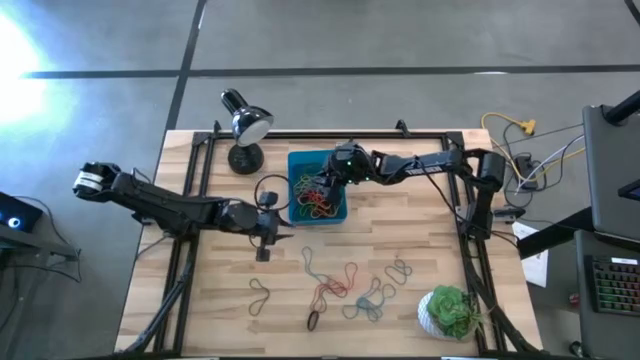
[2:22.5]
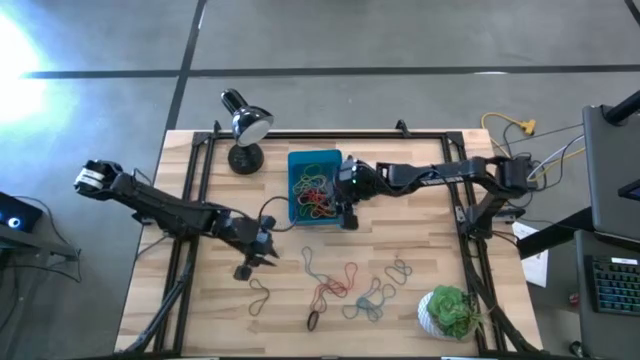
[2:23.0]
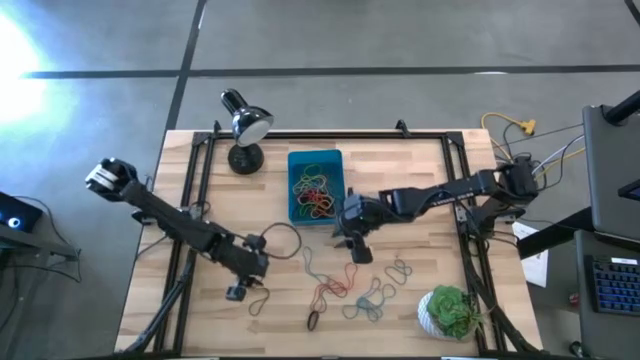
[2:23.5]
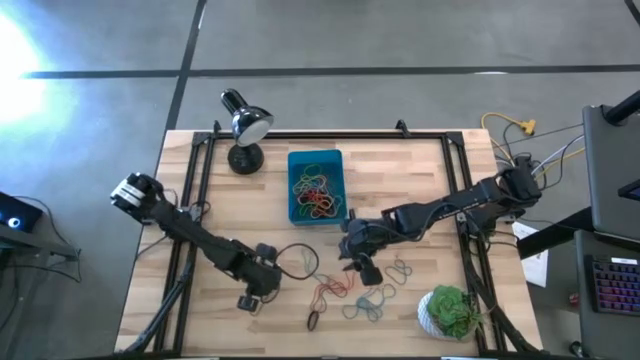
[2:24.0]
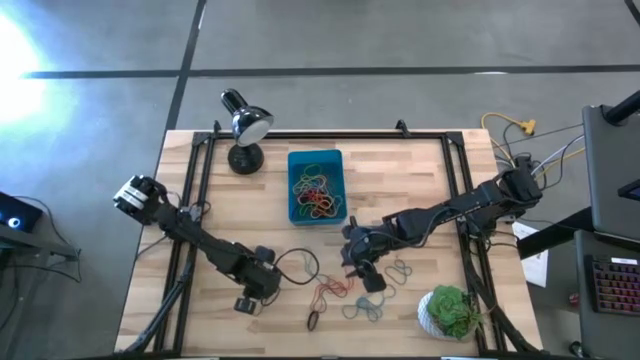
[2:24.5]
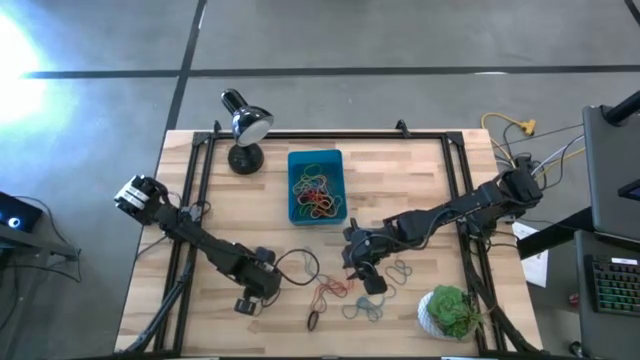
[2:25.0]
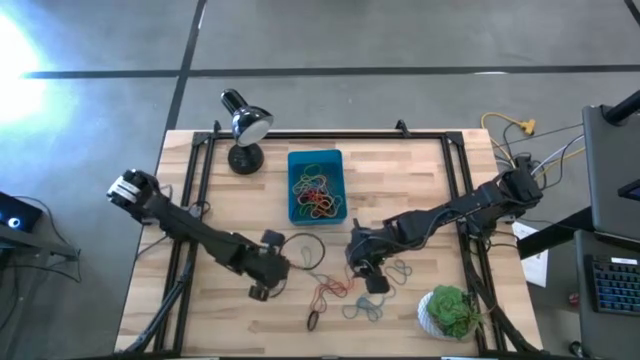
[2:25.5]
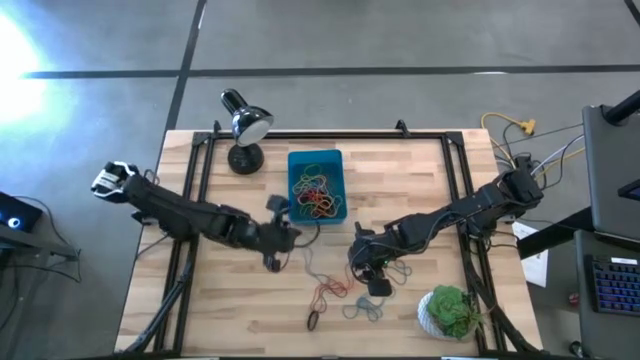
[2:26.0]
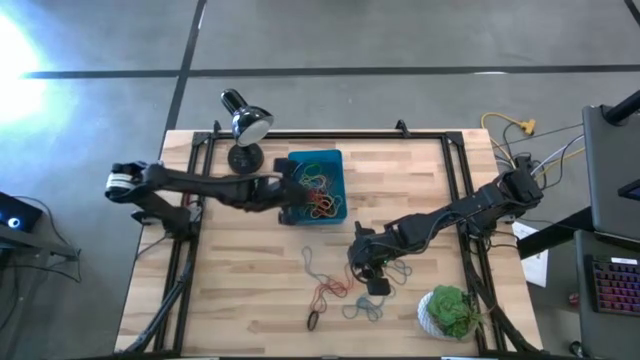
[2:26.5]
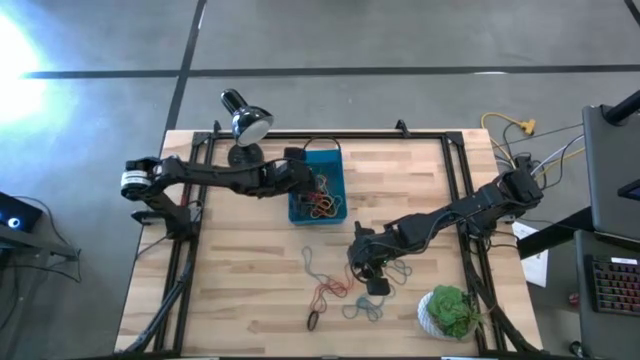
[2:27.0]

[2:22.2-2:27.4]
Task: Pick and place rubber bands into bin
Put the violet rubber band into the blue bin

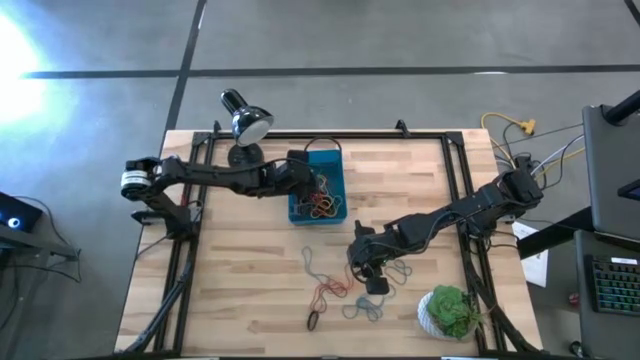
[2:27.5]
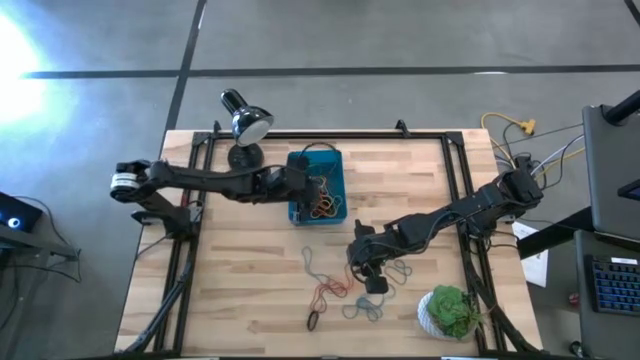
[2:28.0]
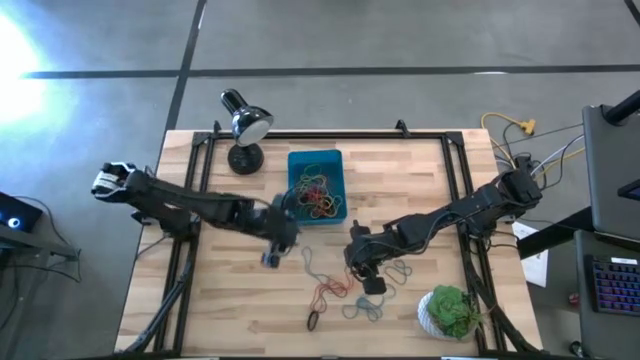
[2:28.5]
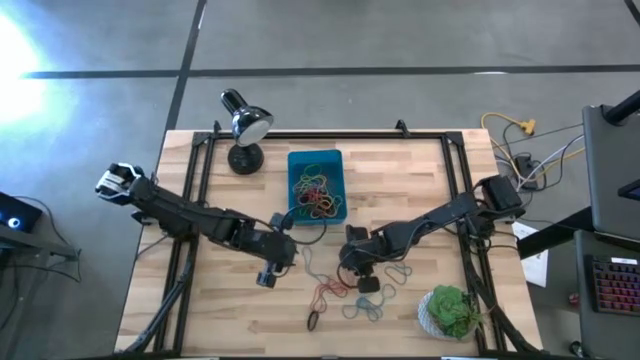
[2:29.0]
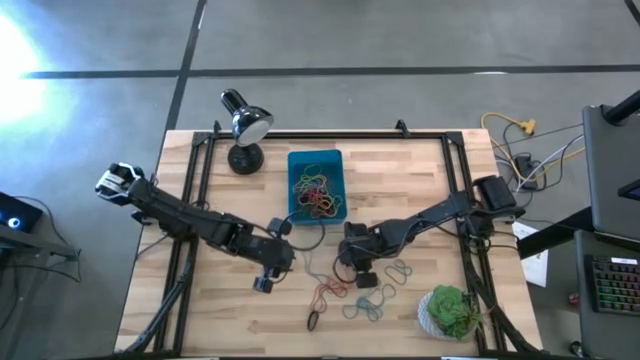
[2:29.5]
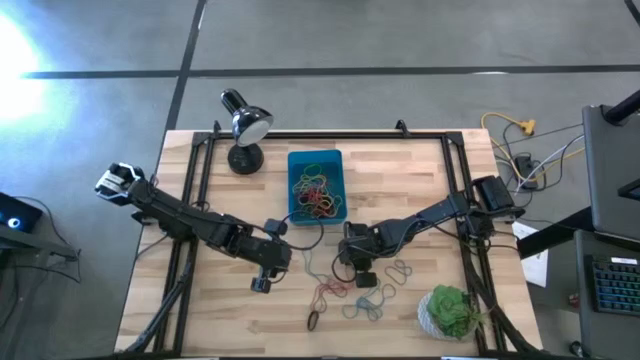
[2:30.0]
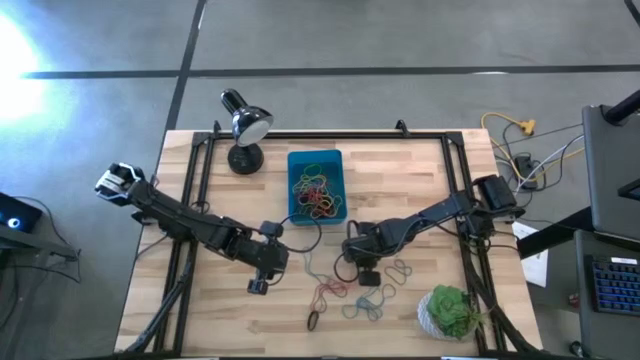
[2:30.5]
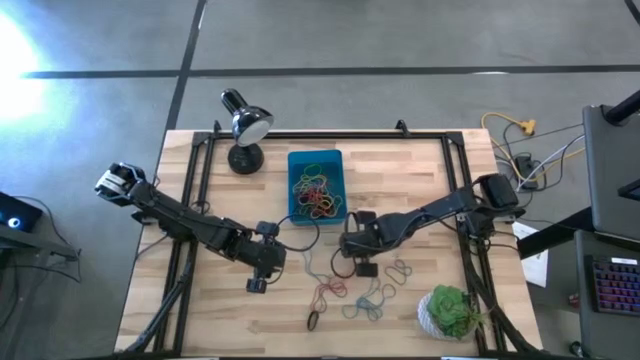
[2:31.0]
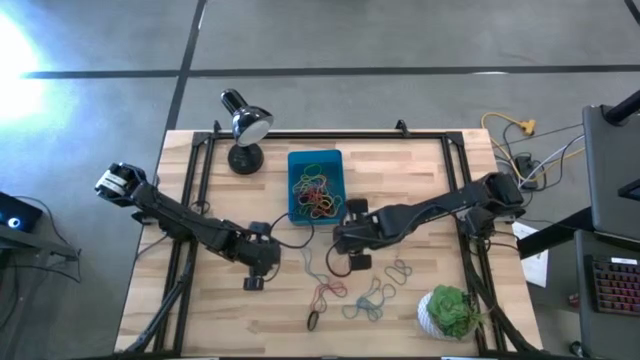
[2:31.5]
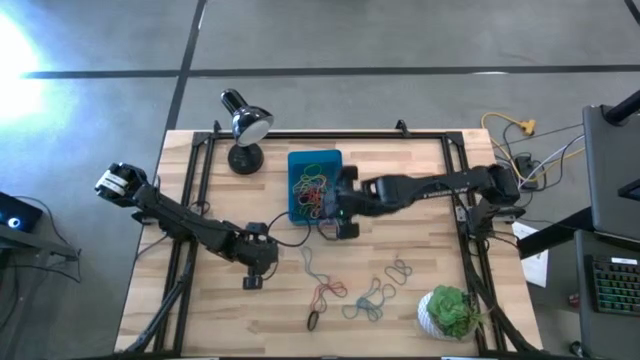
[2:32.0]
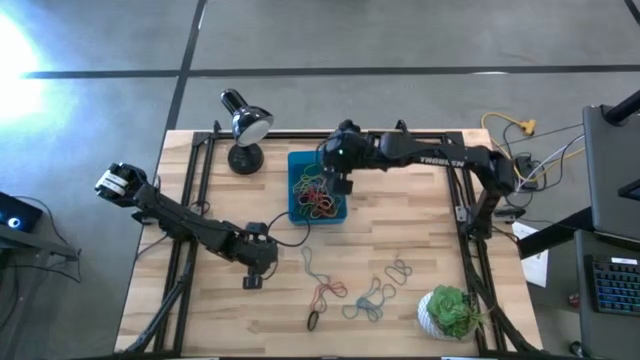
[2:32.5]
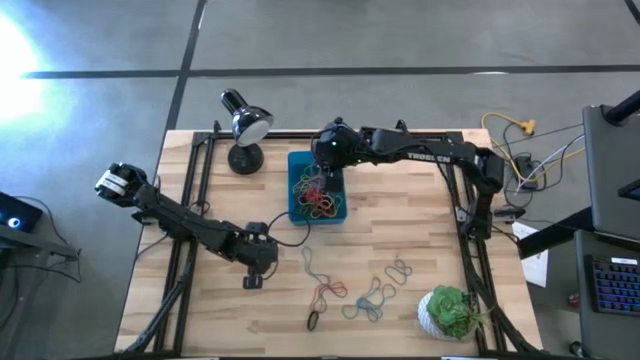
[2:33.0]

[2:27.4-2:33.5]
Put the red rubber band into the blue bin

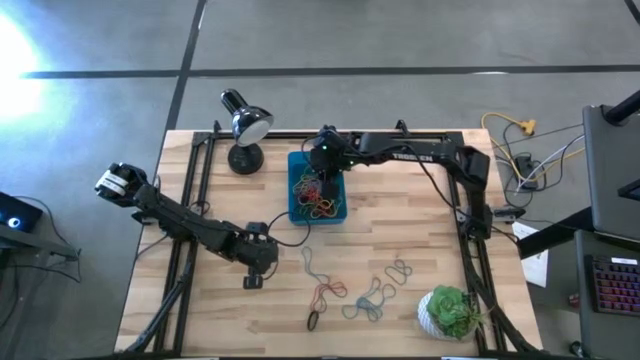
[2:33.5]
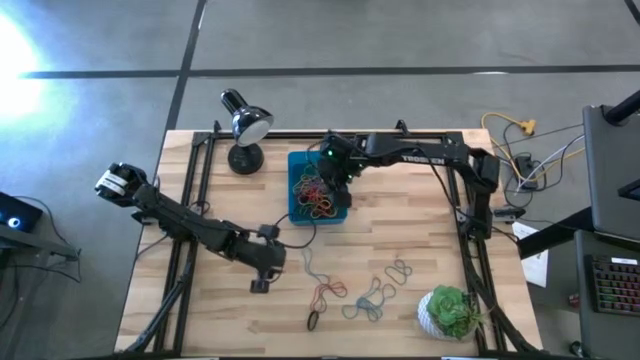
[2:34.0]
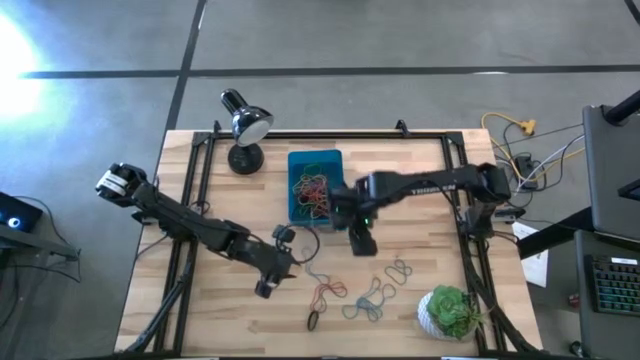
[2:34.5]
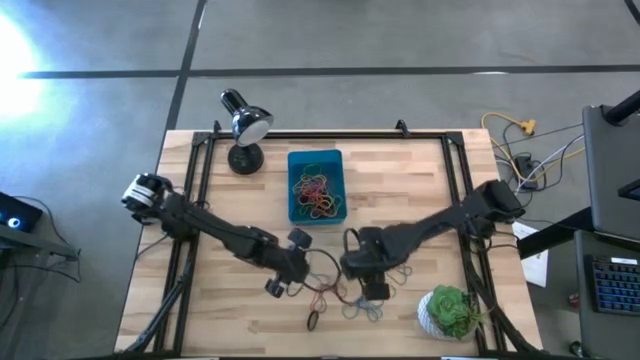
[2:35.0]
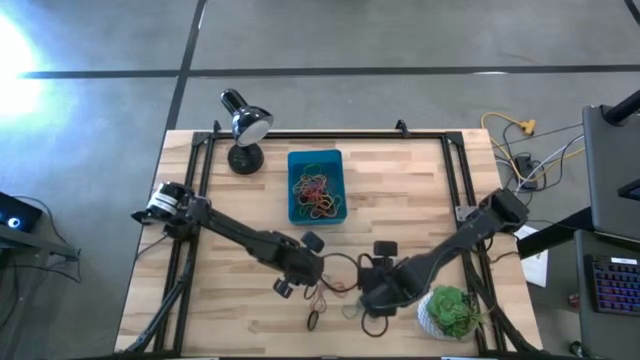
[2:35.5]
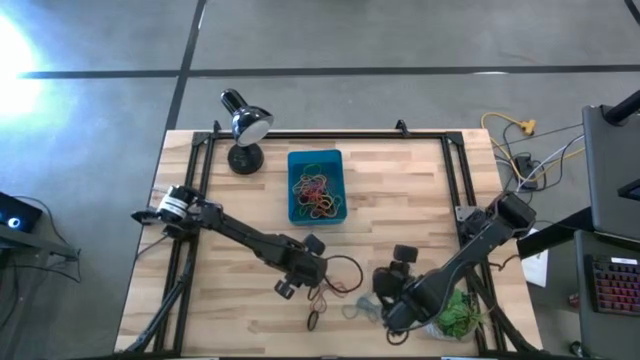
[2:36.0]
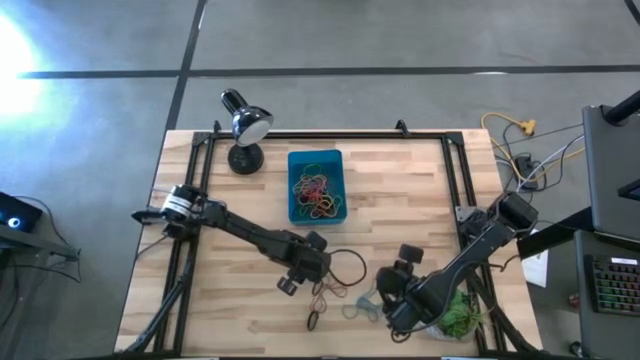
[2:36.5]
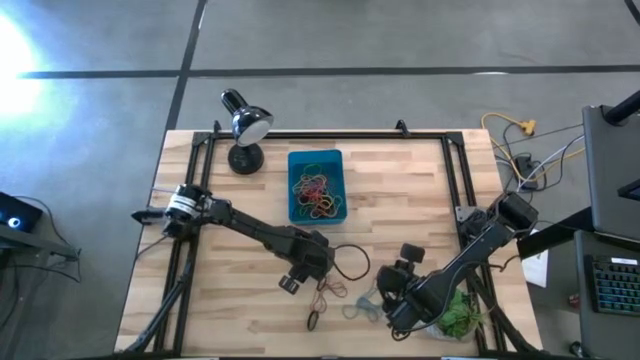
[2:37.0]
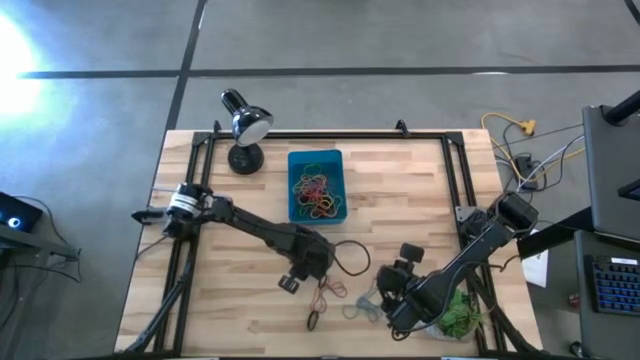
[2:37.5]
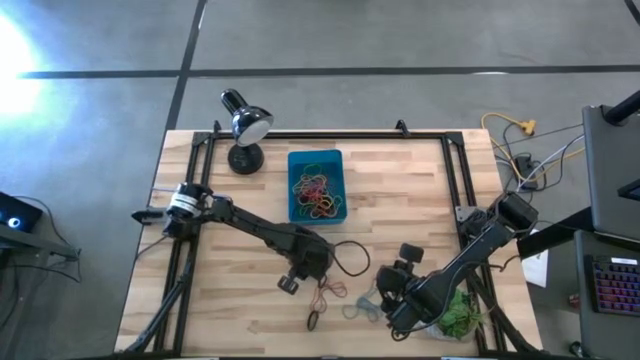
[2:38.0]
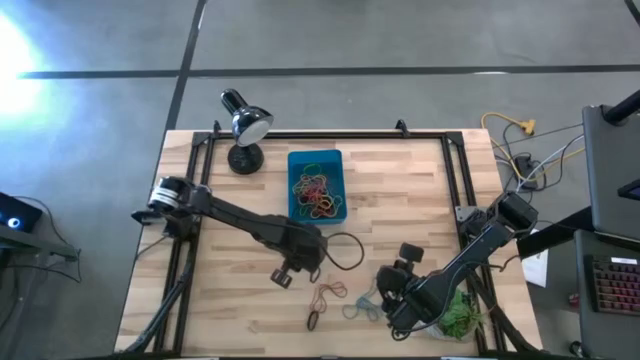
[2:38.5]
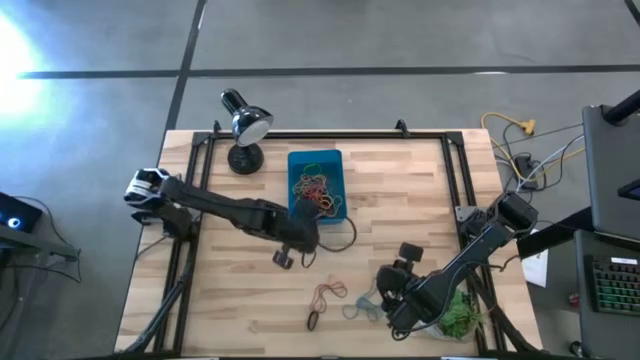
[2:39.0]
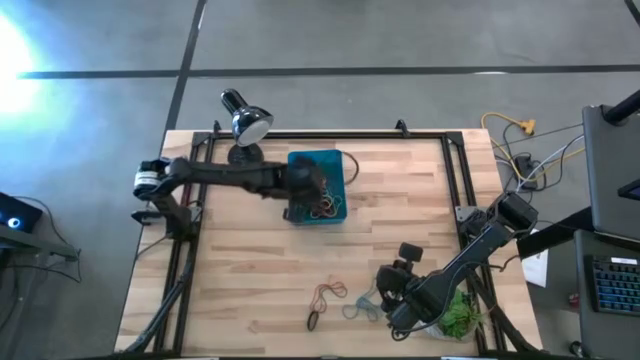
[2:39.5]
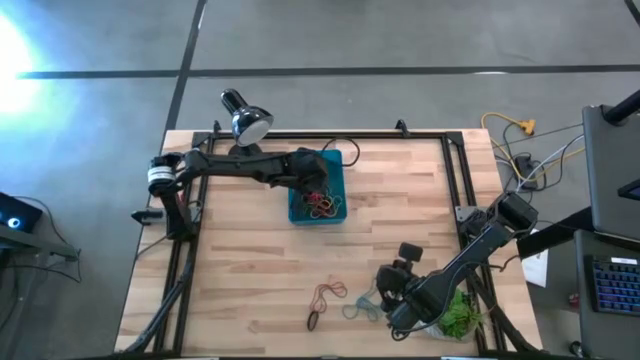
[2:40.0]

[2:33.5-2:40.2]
Put the blue rubber band into the blue bin

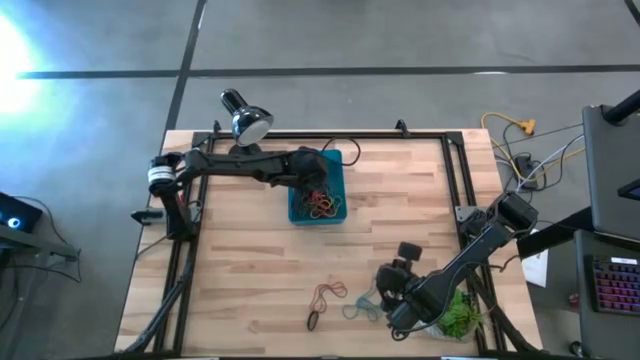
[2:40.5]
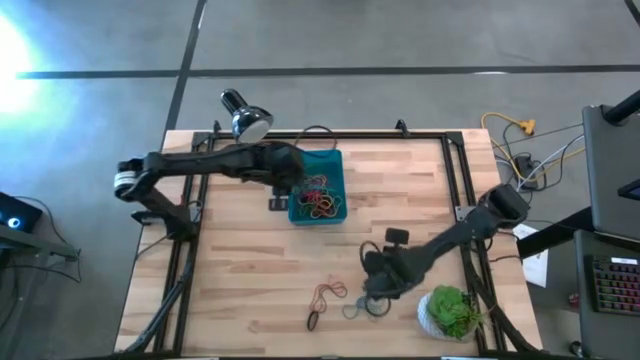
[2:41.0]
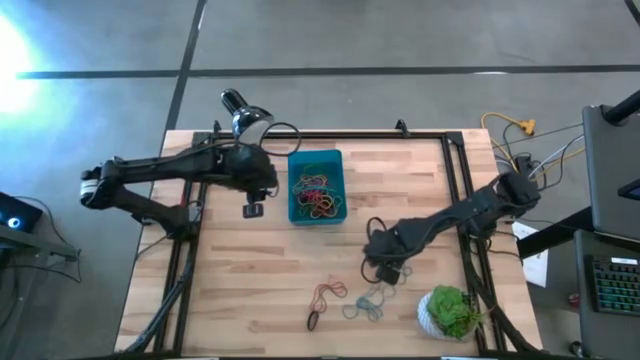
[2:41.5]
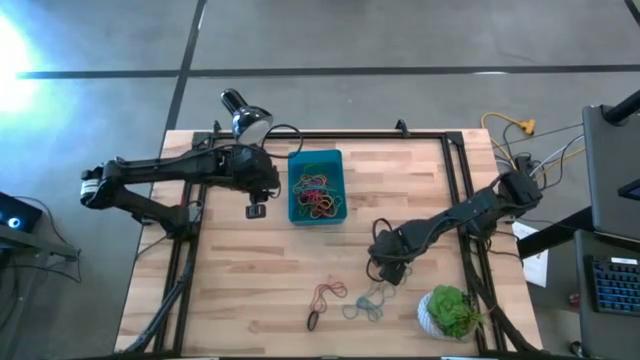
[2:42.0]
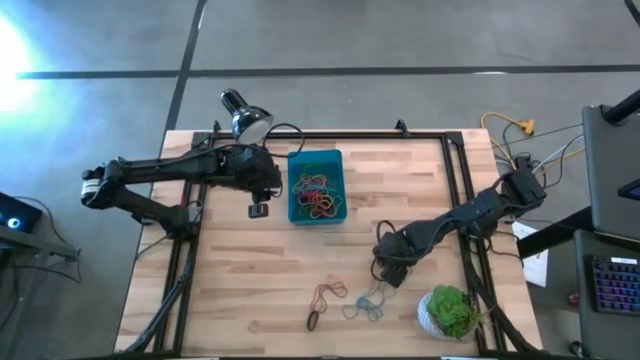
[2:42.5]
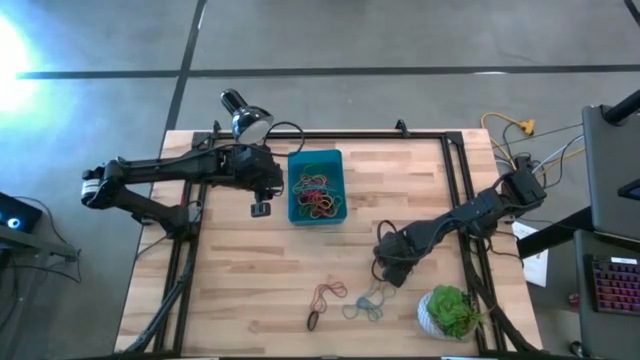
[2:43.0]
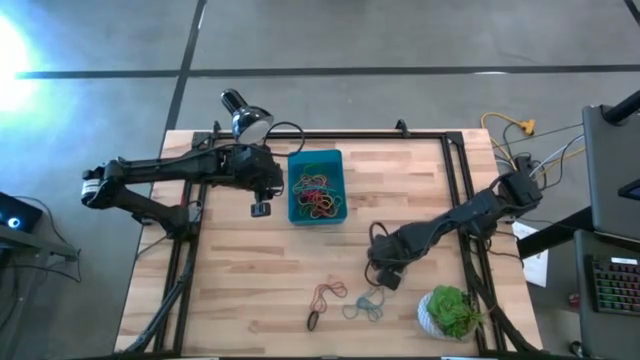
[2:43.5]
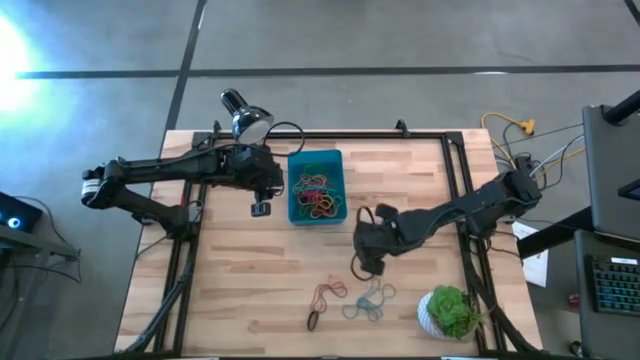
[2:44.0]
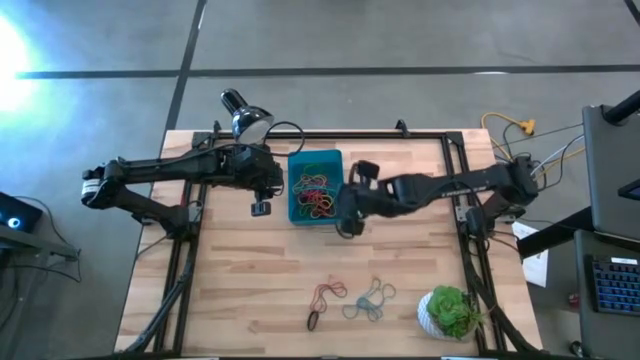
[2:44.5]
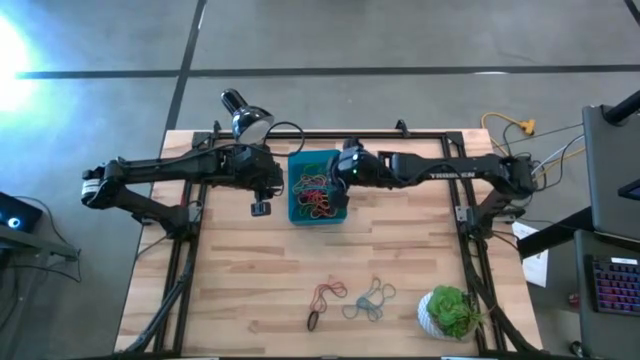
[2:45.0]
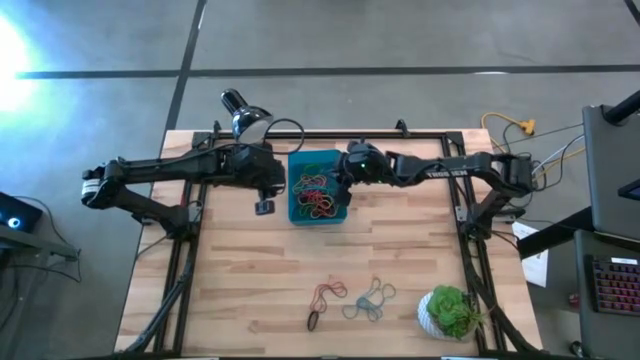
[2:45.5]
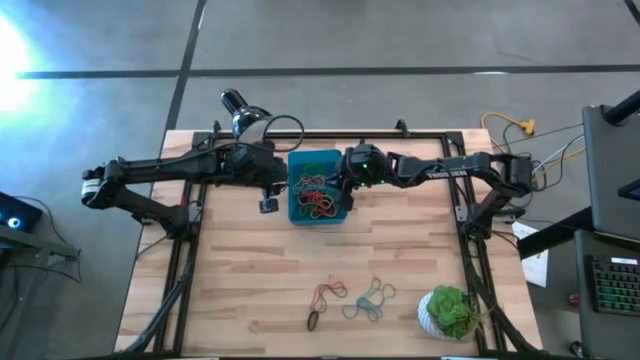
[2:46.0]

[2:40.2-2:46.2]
Put the blue rubber band into the blue bin
